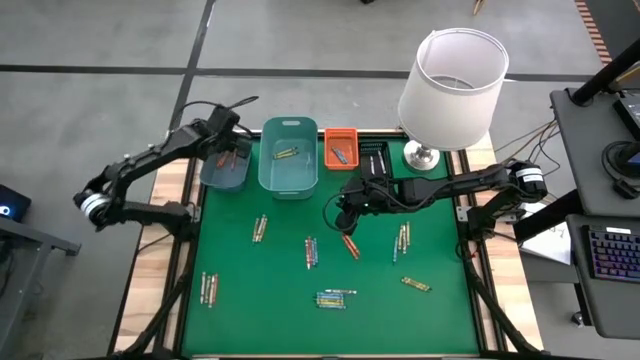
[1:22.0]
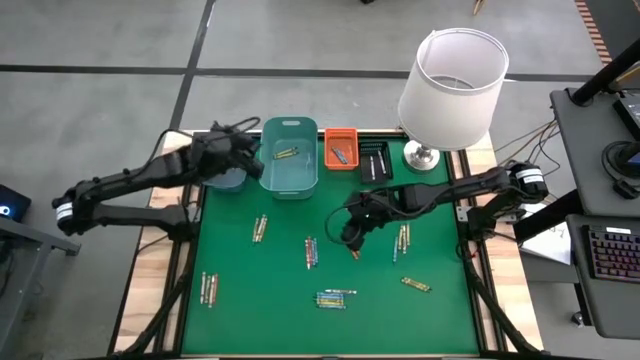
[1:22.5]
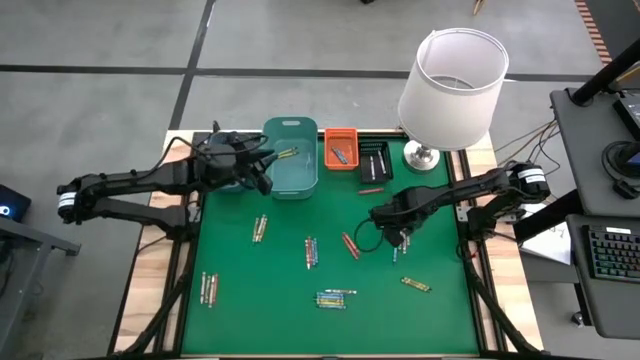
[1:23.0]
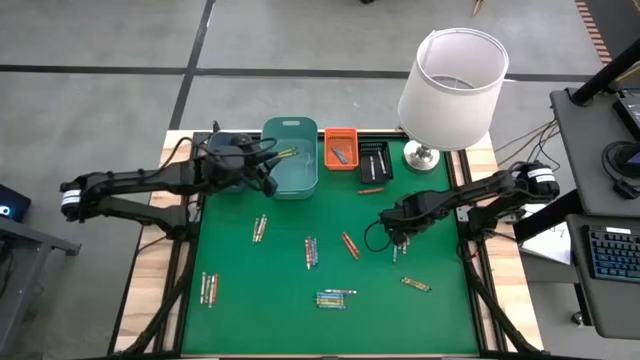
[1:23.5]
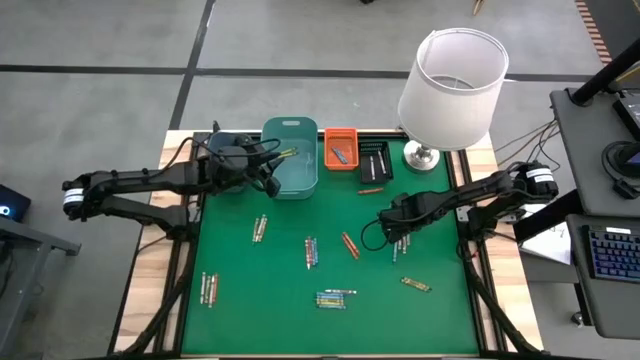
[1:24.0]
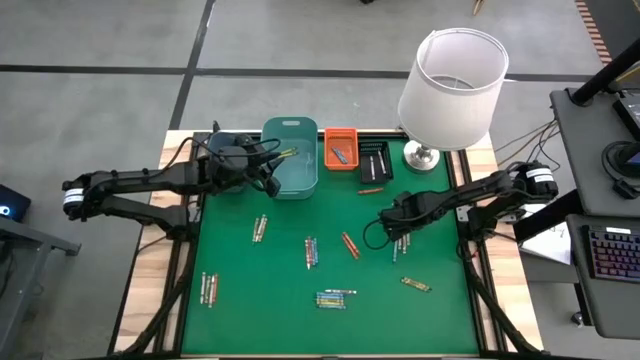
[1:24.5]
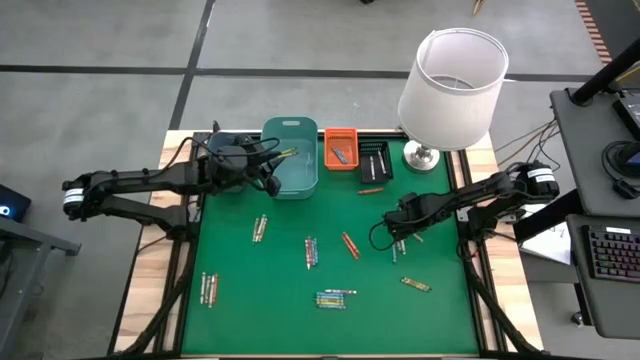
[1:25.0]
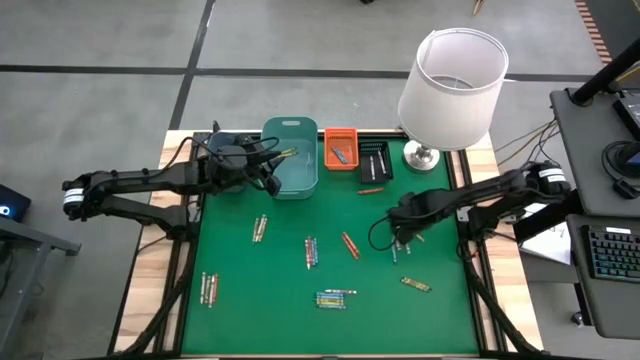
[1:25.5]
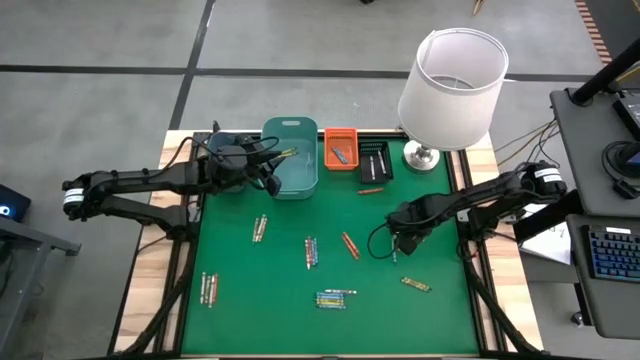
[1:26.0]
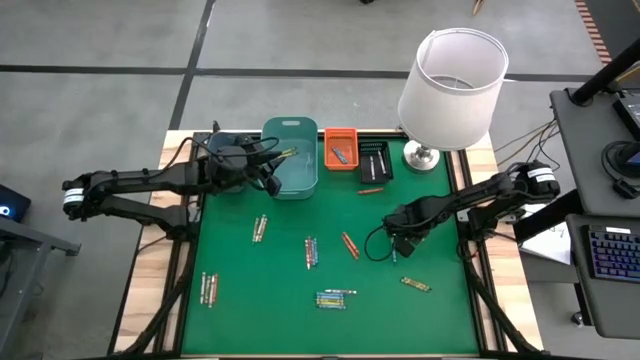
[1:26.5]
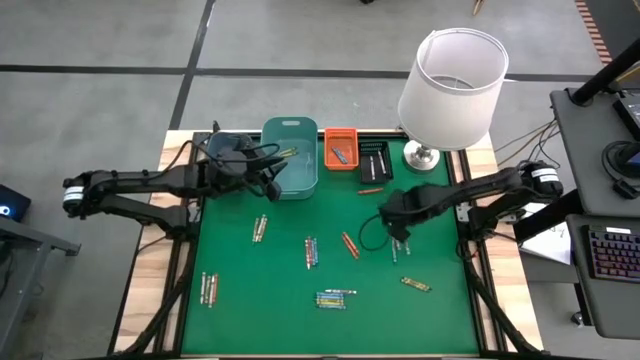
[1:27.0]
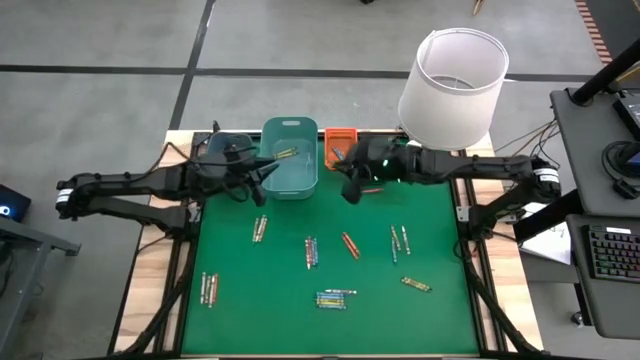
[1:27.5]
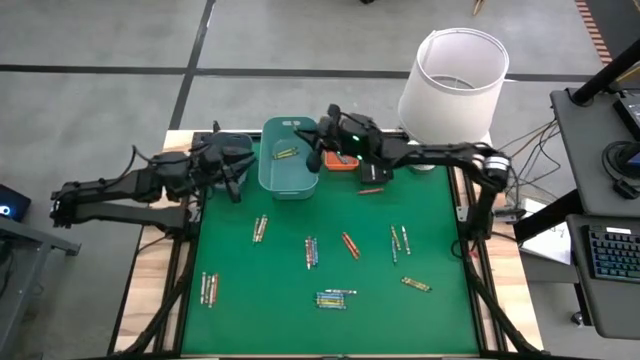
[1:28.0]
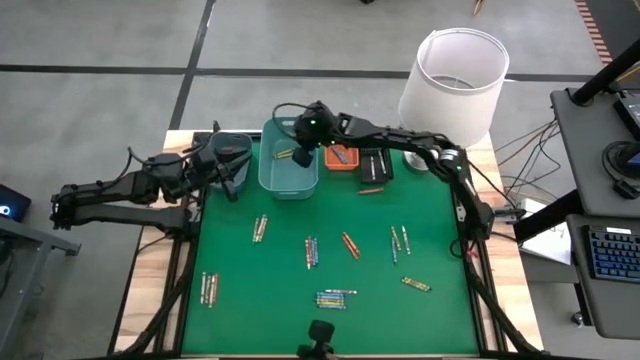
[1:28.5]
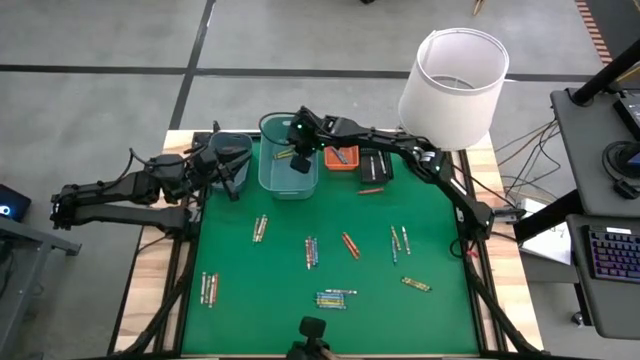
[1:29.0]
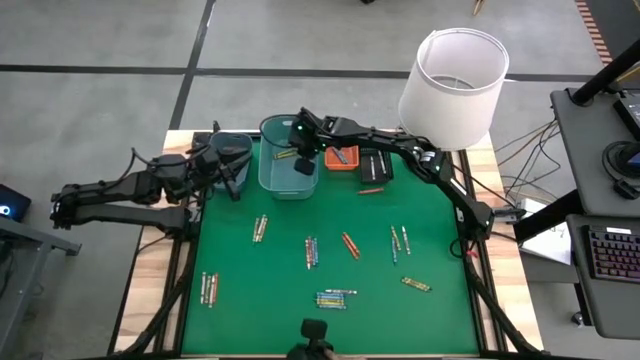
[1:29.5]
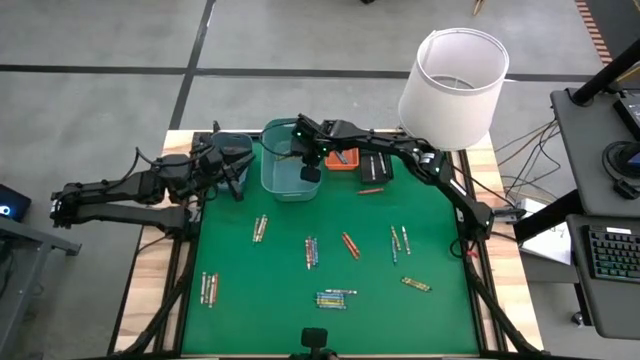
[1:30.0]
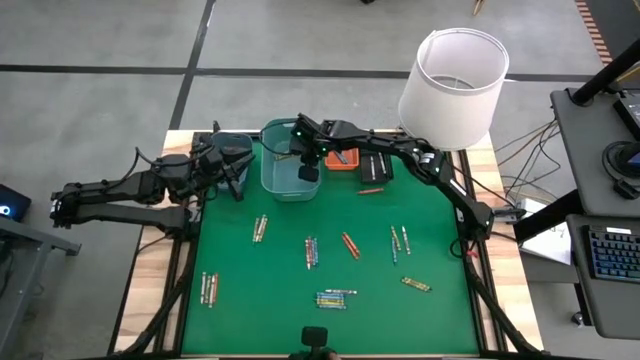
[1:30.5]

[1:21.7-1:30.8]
Task: Sort crayons
Put the green crayon into the green bin

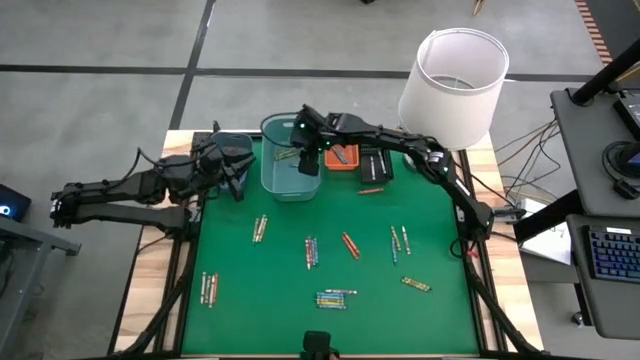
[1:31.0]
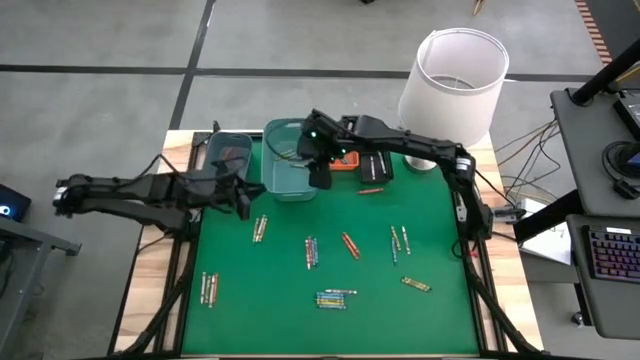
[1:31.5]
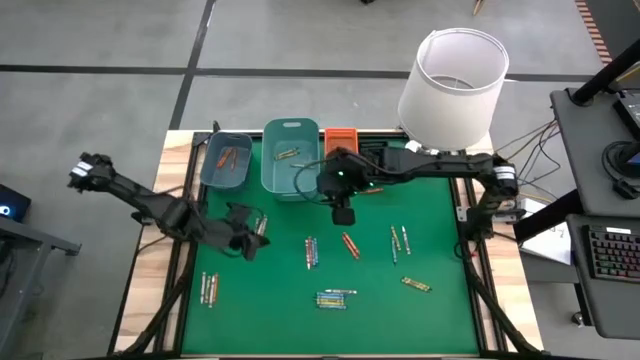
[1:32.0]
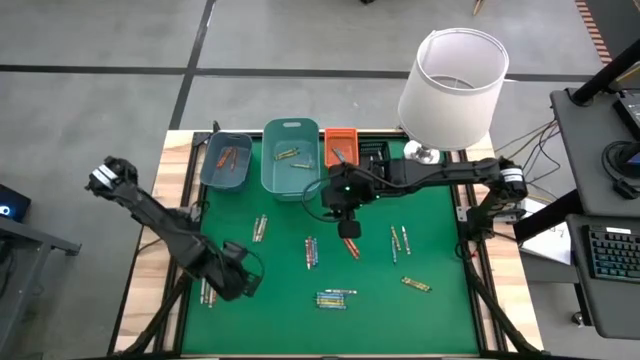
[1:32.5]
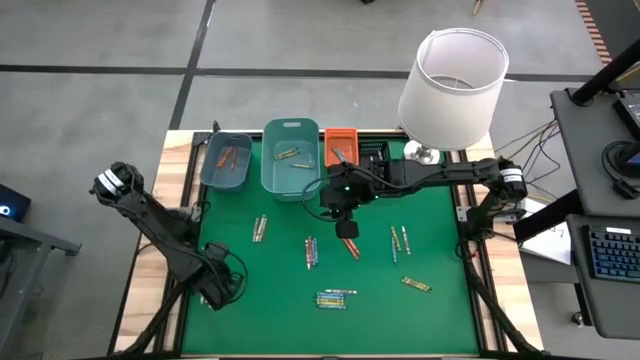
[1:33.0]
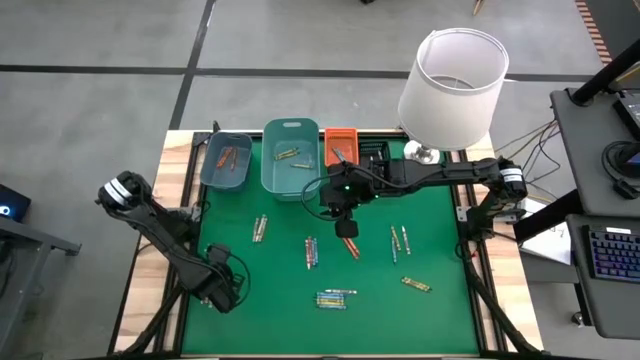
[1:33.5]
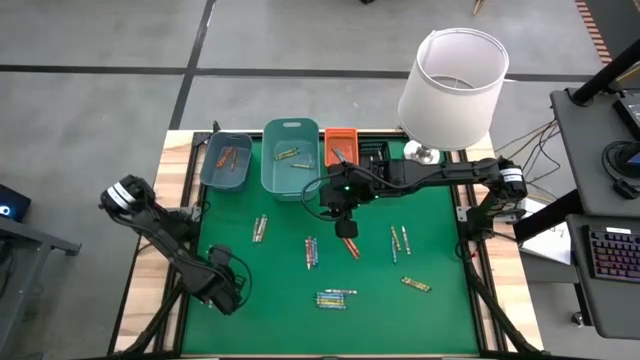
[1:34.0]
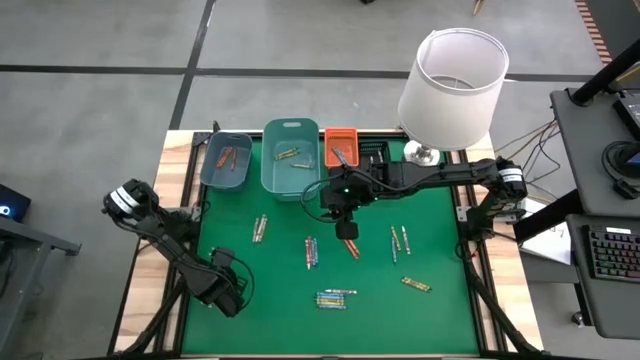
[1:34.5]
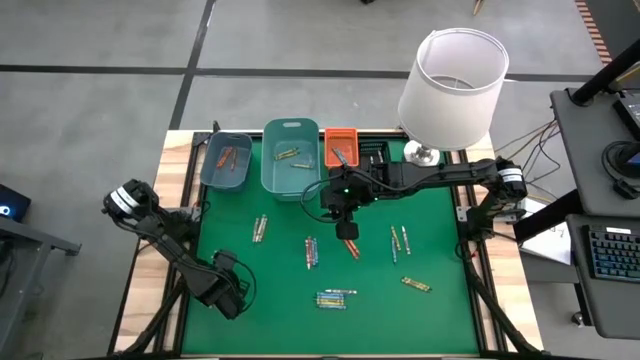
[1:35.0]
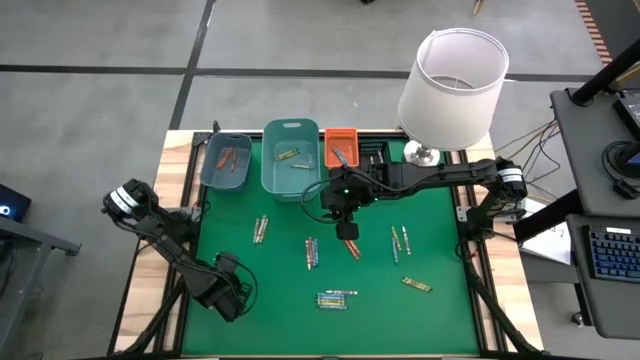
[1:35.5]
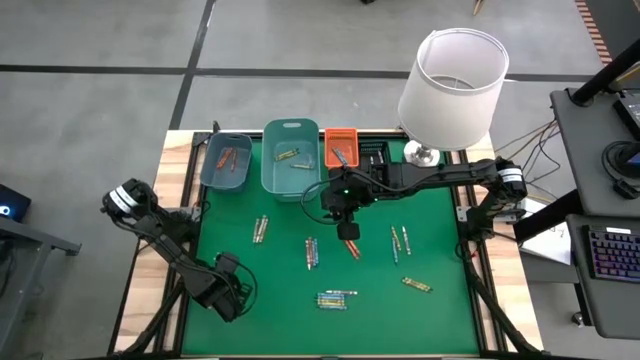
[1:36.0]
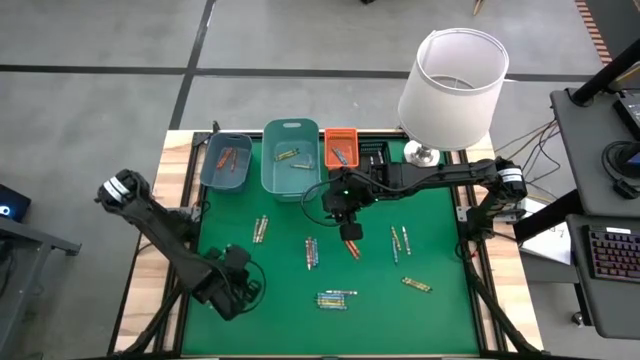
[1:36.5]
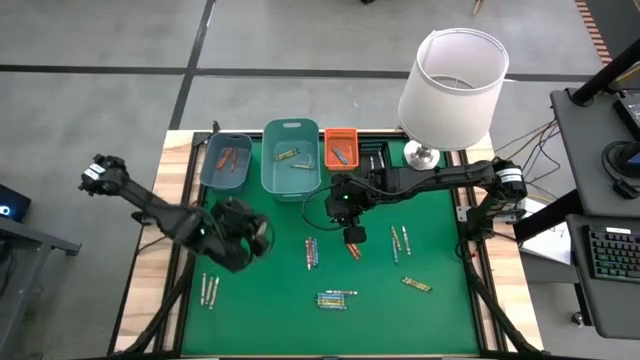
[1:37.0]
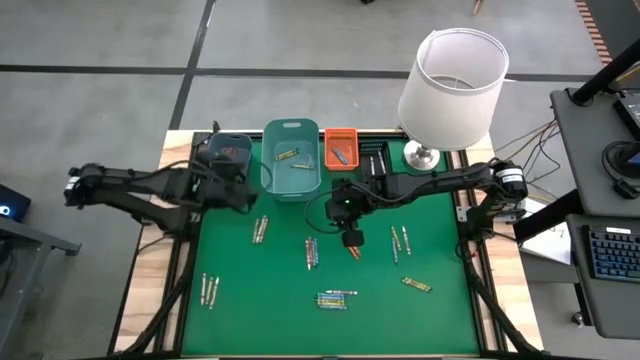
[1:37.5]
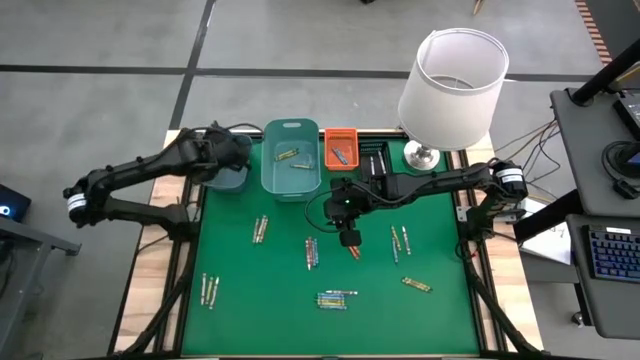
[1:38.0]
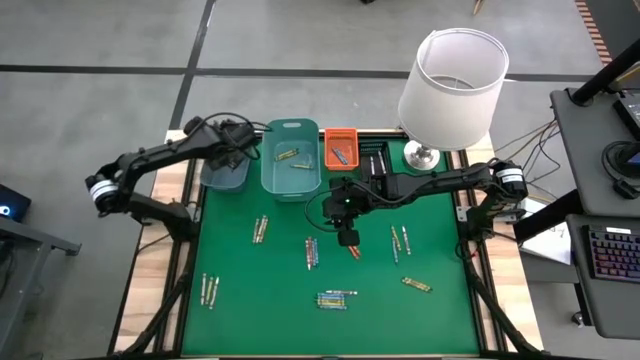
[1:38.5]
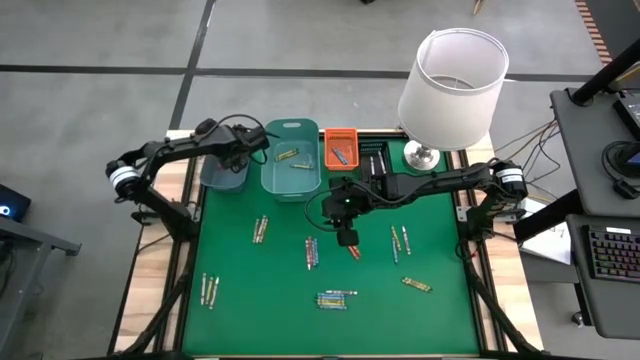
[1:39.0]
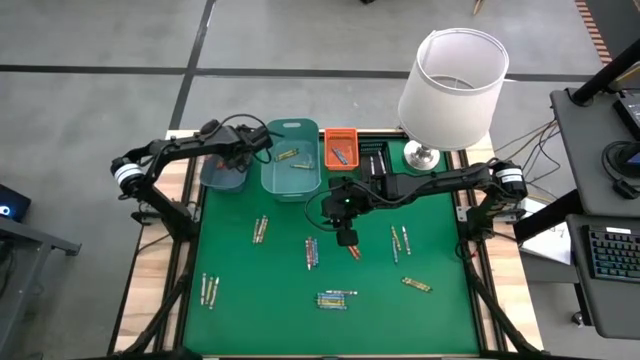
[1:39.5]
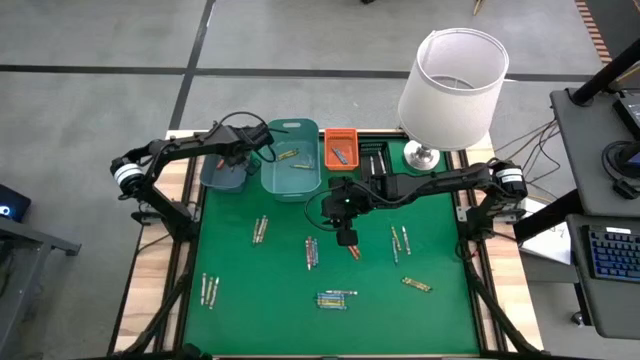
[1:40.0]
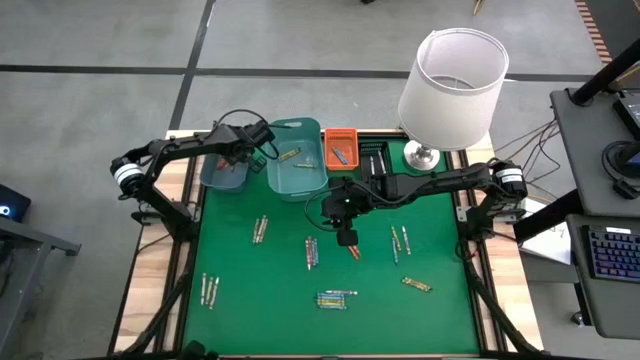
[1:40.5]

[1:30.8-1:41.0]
Put the orange crayon into the blue bin

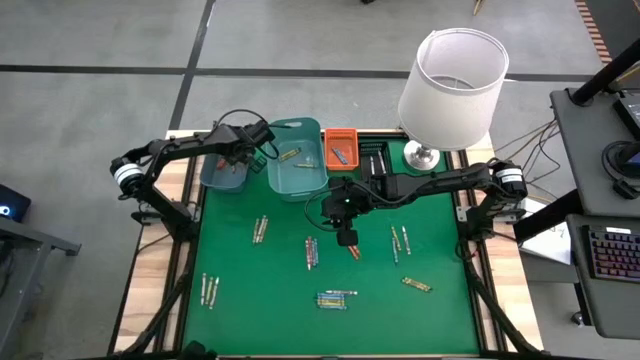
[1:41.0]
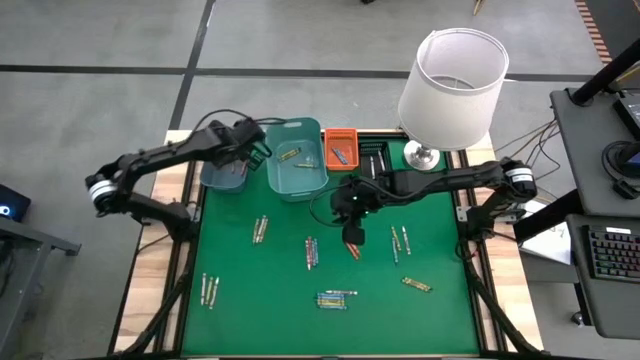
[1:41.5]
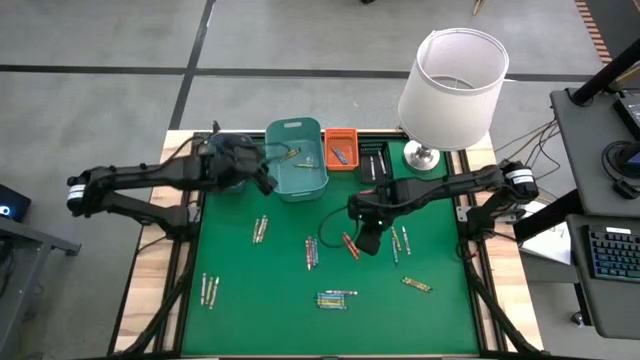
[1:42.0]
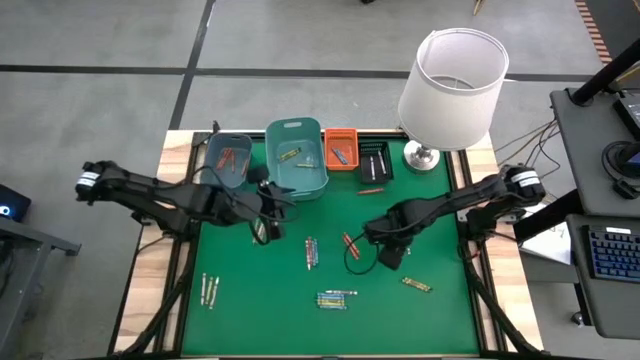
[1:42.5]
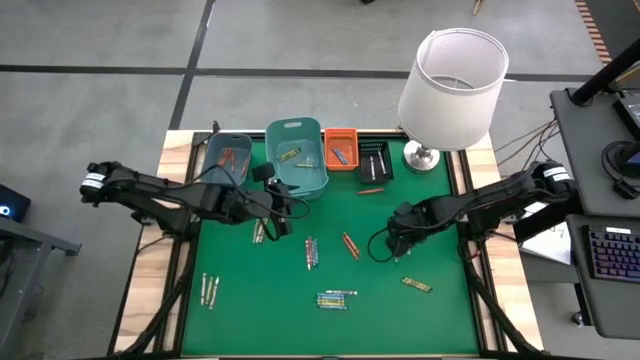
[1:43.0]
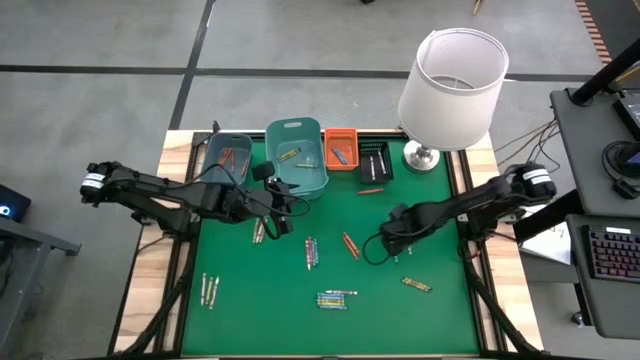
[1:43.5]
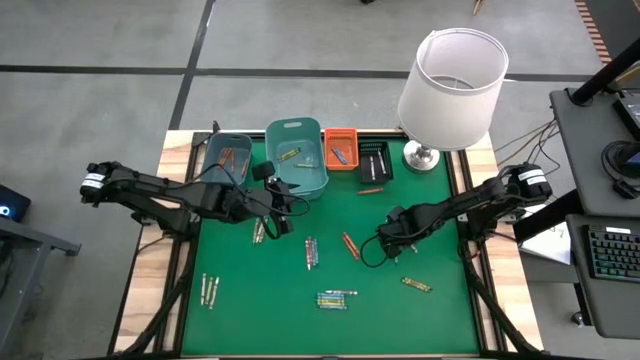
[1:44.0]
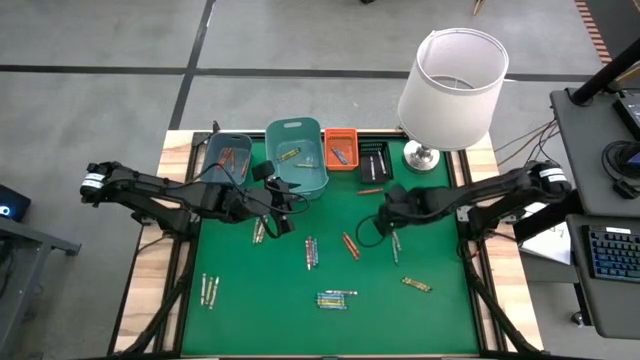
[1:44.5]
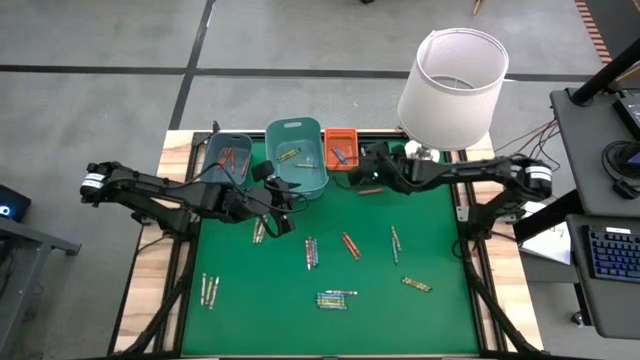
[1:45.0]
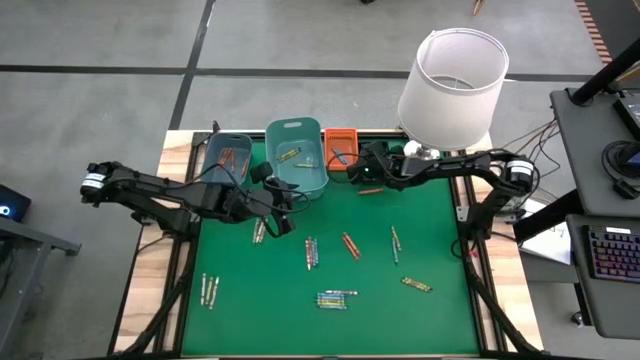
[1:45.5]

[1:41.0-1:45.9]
Put the white crayon into the black bin
